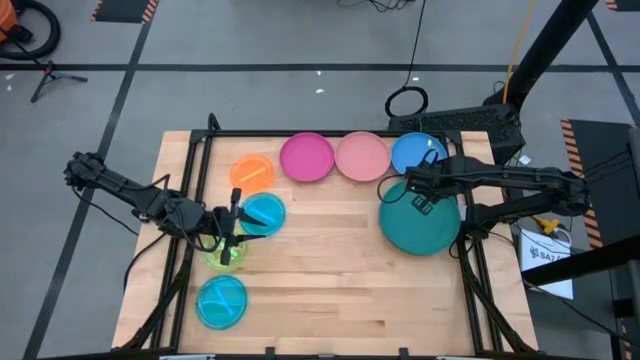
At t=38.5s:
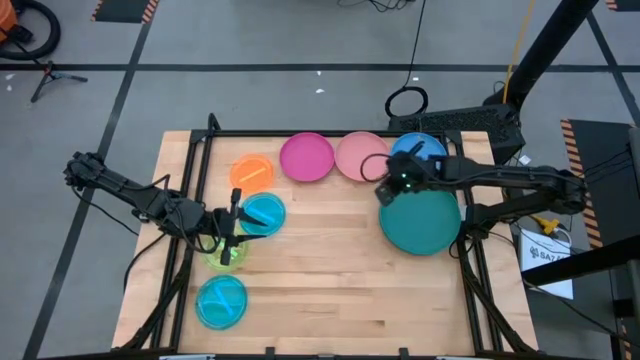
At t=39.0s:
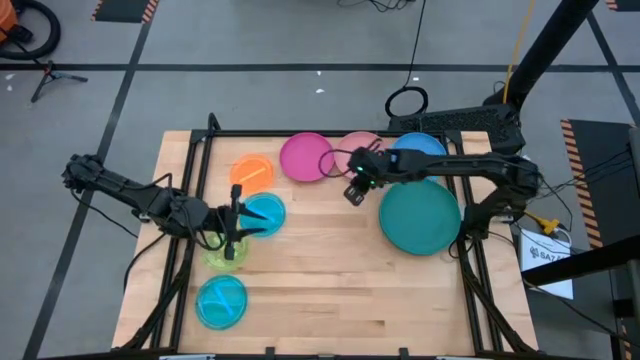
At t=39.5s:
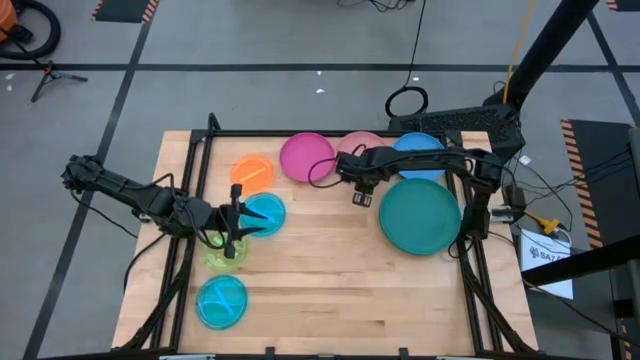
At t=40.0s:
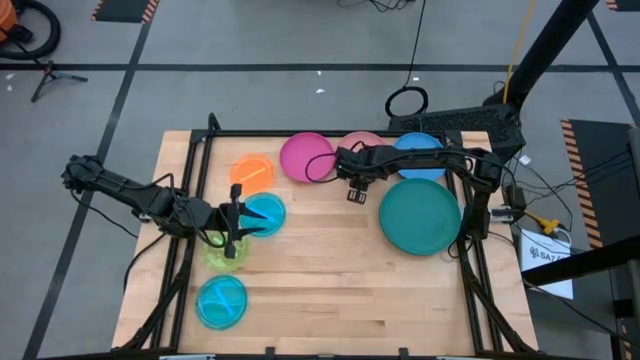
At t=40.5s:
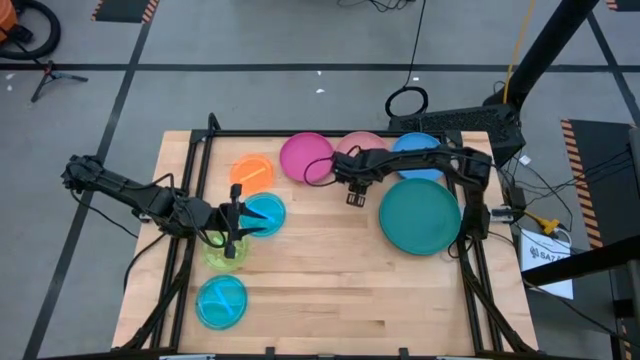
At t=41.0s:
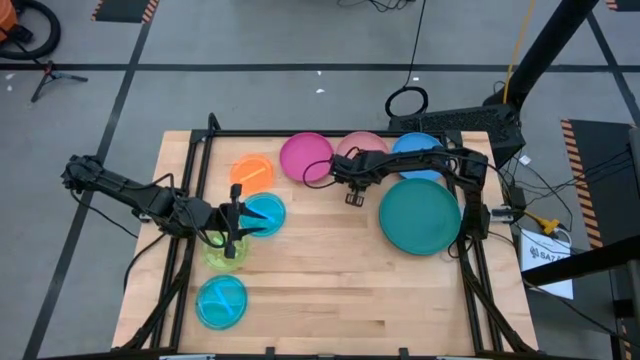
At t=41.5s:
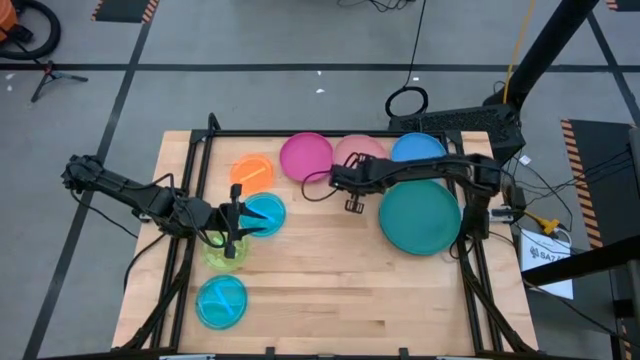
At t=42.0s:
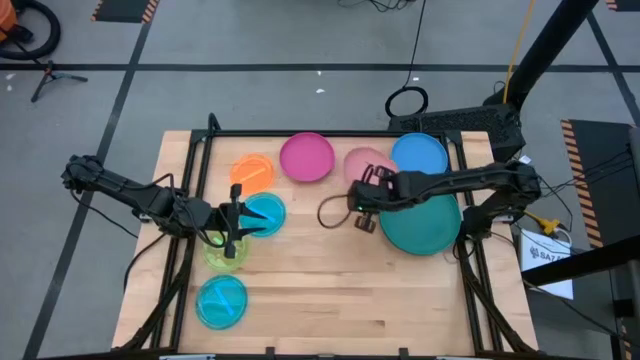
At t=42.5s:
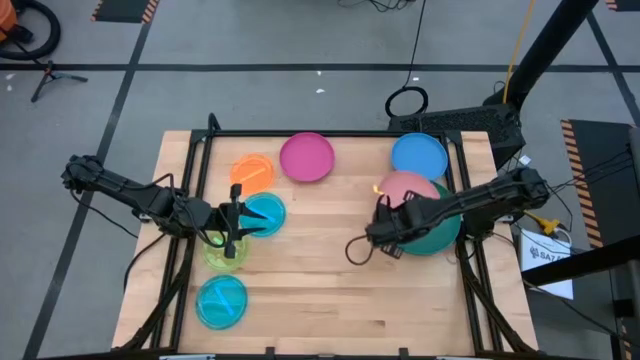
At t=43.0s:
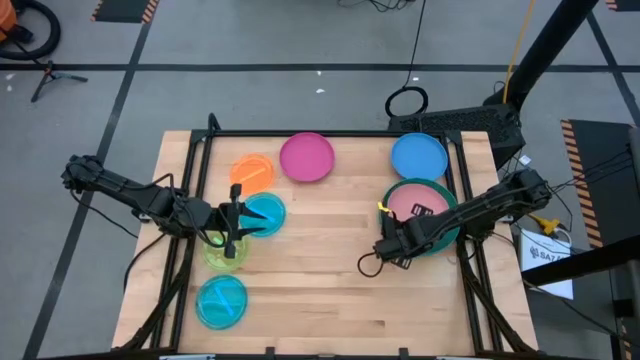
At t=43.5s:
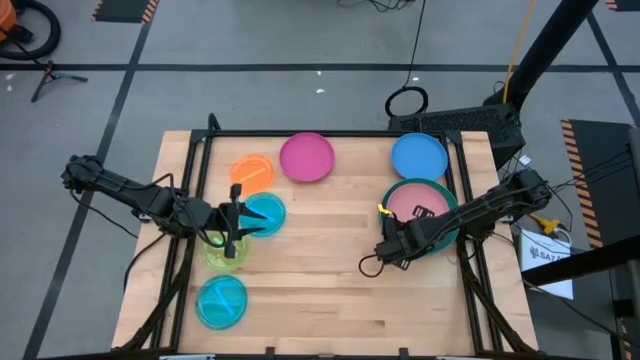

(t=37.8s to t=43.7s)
Task: Stack plastic plates
Stack the light pink plate on top of the dark blue plate

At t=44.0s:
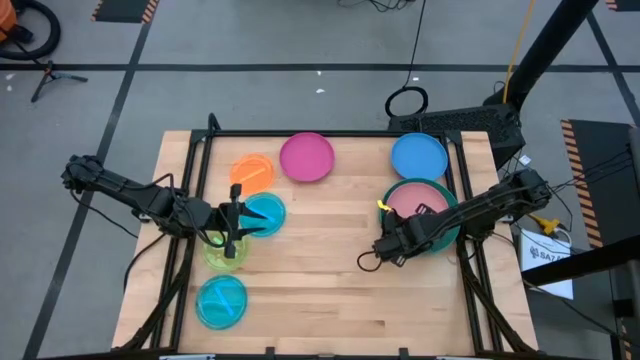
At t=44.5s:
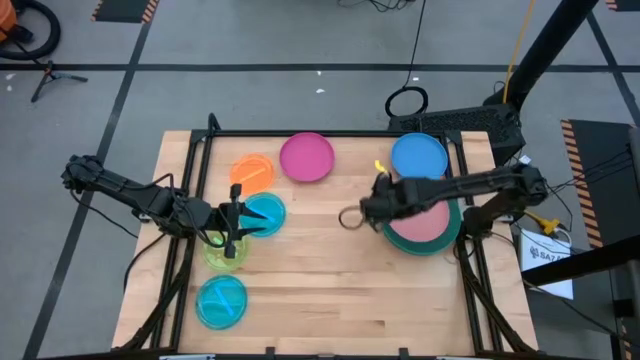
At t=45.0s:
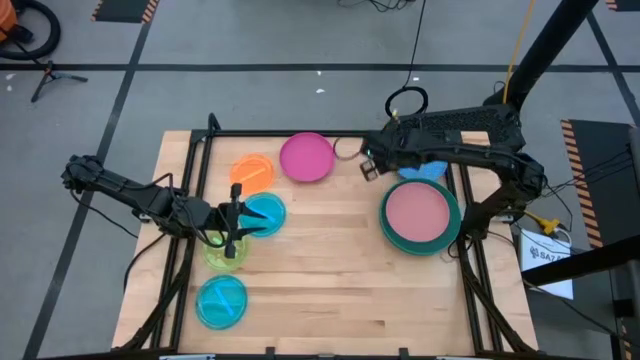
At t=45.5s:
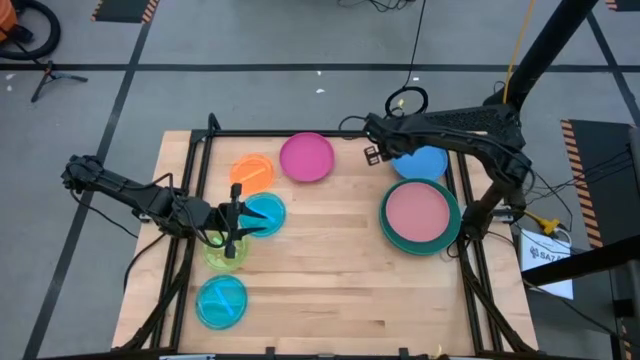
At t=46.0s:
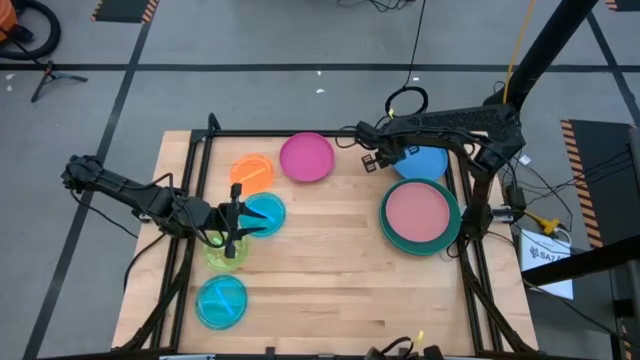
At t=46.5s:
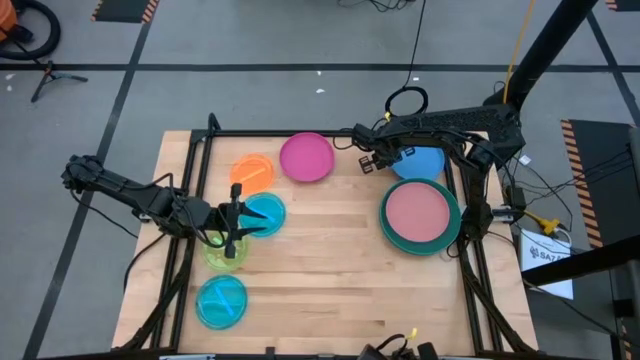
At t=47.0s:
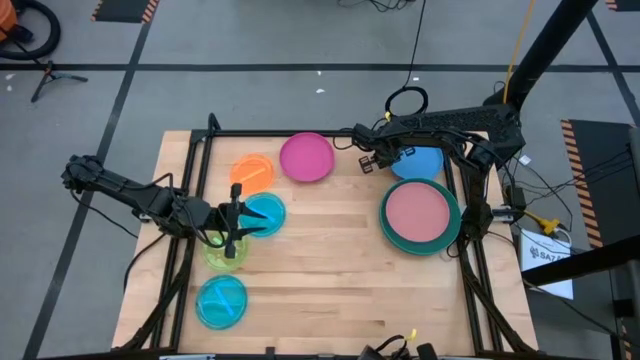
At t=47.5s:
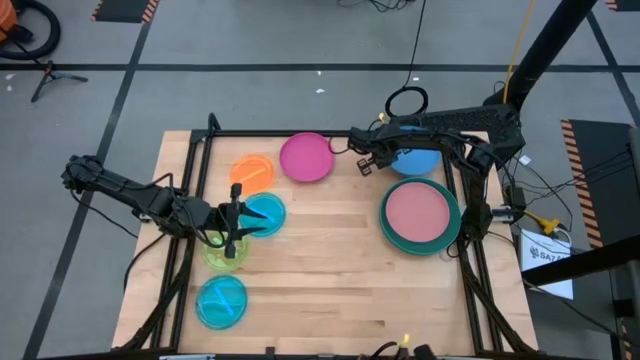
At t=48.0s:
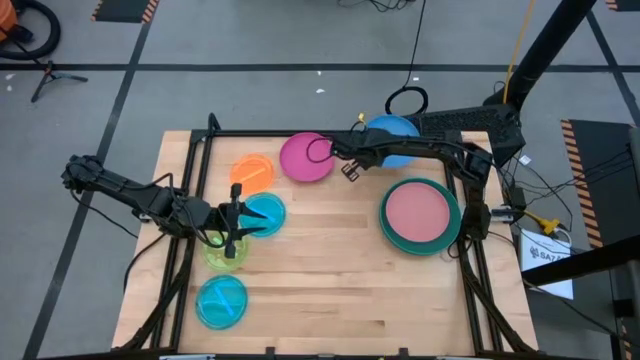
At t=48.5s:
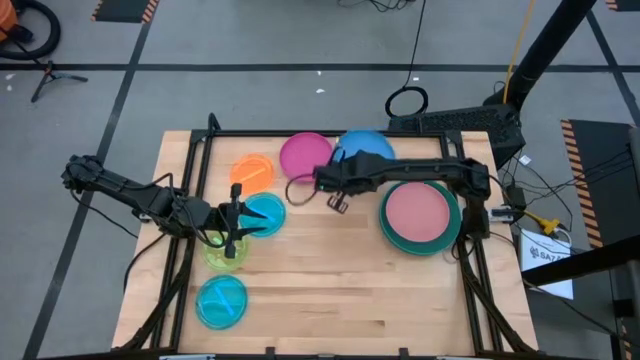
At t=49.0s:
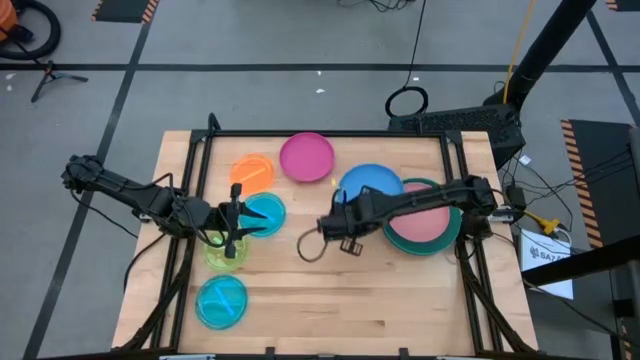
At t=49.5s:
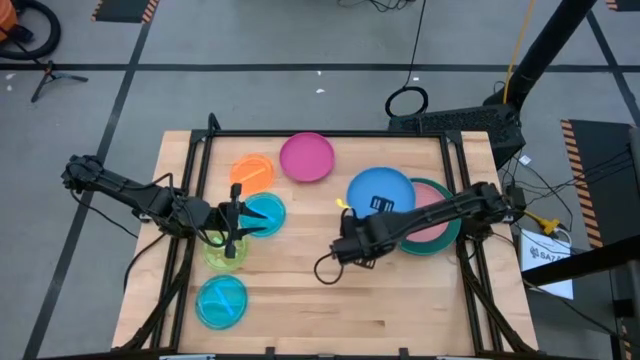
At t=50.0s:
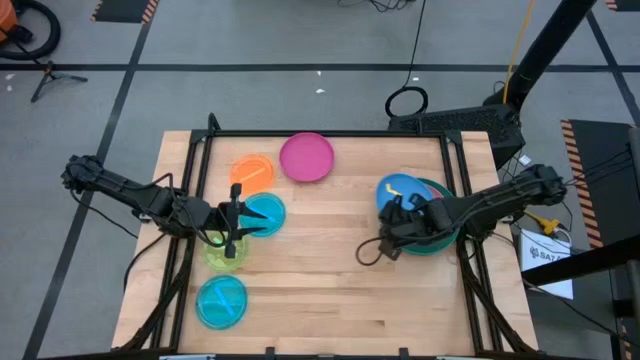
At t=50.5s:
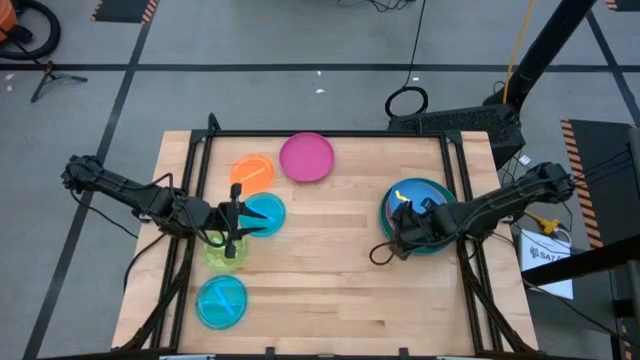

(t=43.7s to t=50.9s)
Stack the blue plate on top of the light pink plate

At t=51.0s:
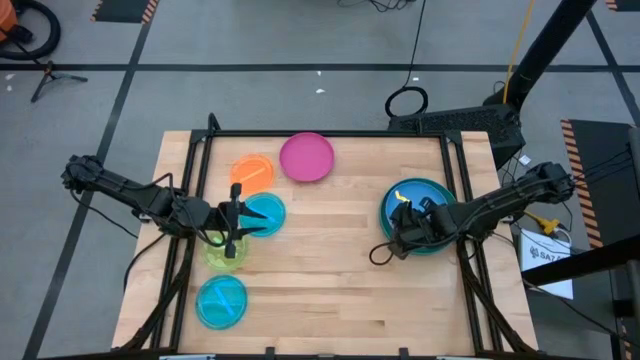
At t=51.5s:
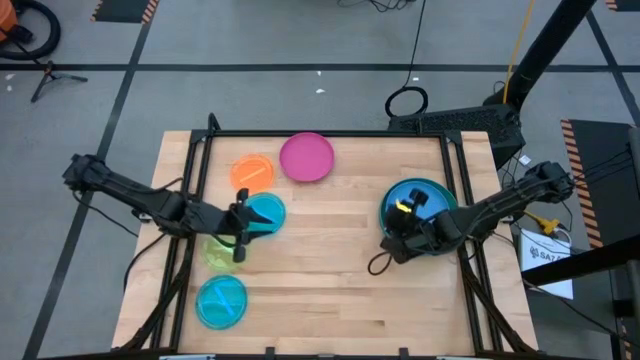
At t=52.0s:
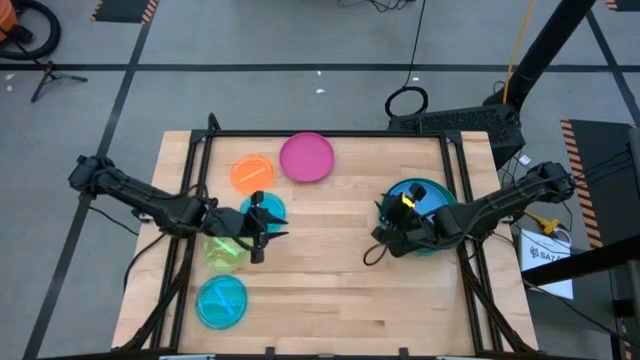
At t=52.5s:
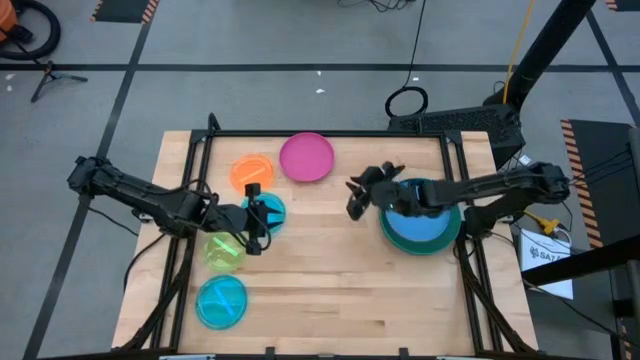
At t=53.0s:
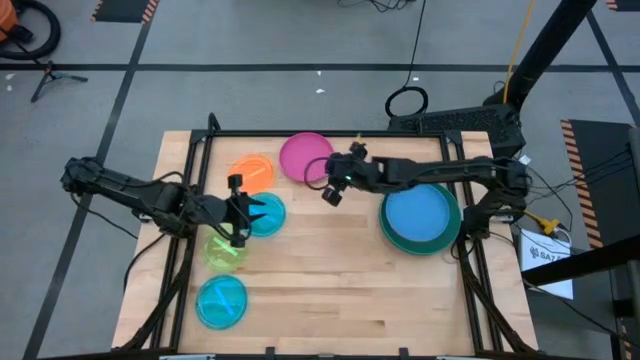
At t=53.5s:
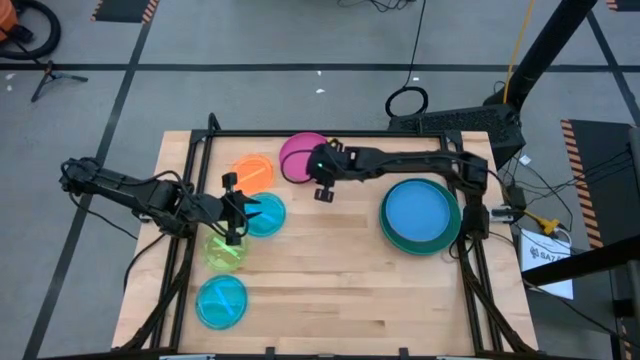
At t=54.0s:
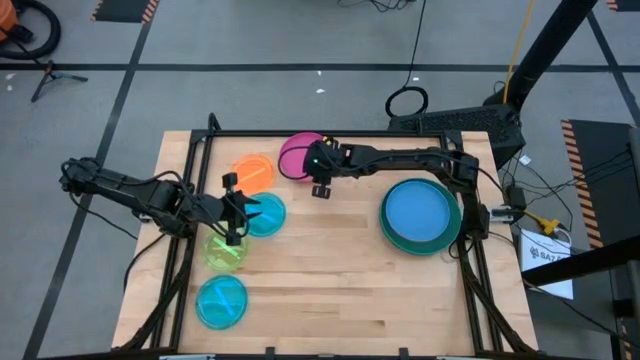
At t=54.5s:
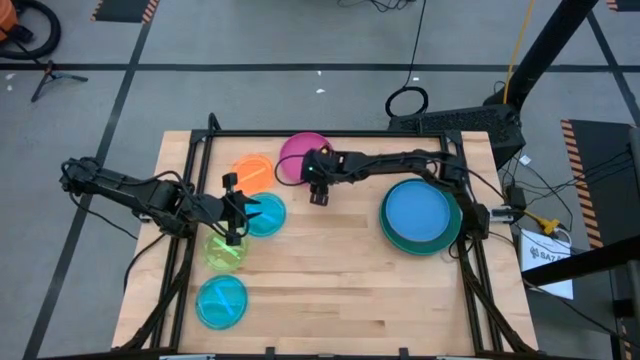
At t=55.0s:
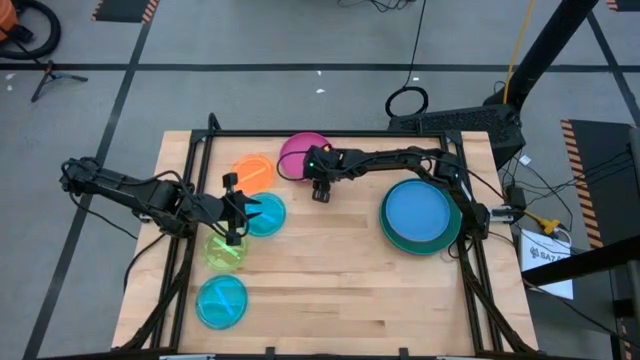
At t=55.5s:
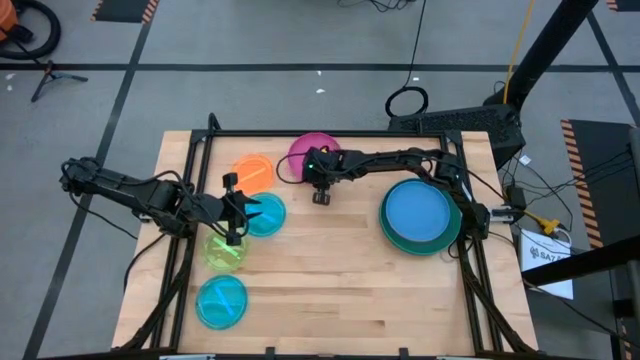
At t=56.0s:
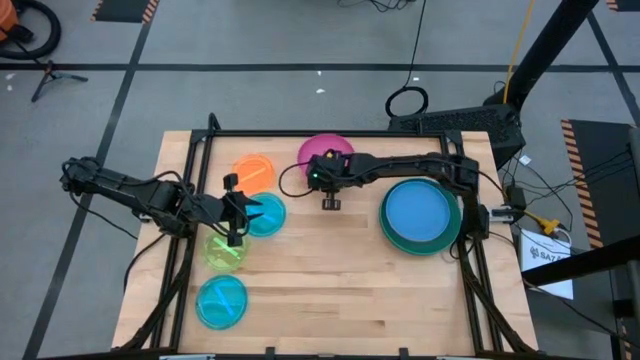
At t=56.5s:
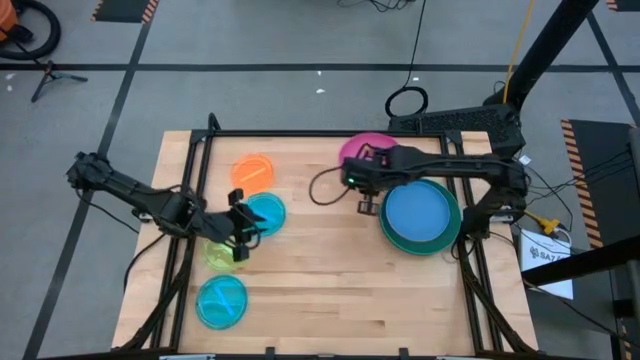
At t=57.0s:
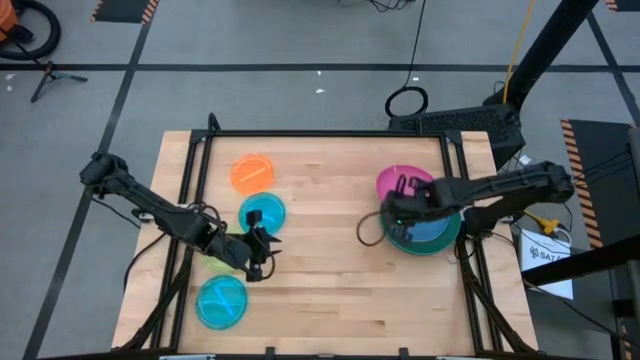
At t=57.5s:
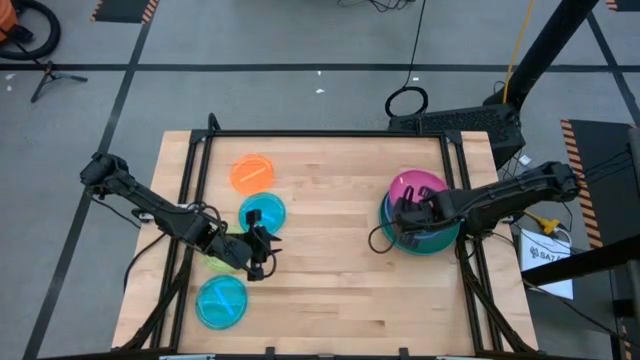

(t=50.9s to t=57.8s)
Stack the pink plate on top of the blue plate
